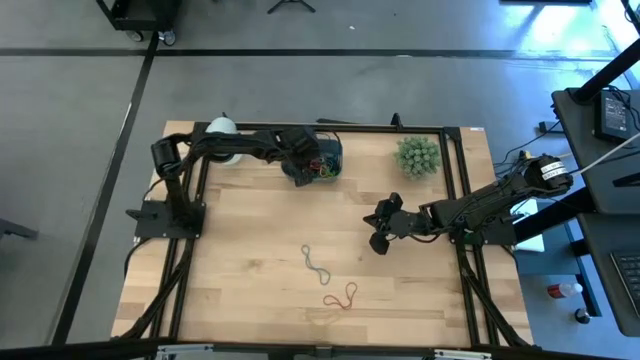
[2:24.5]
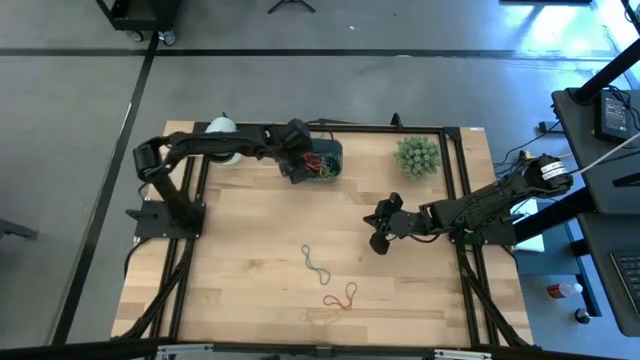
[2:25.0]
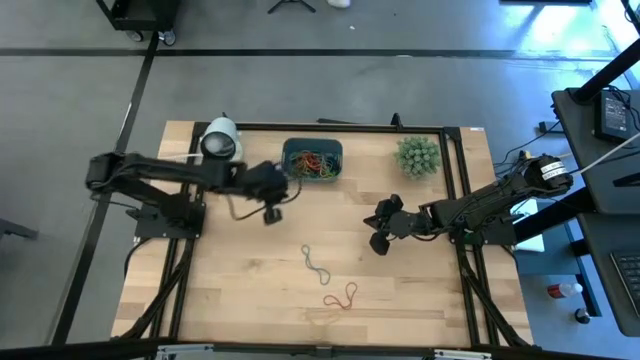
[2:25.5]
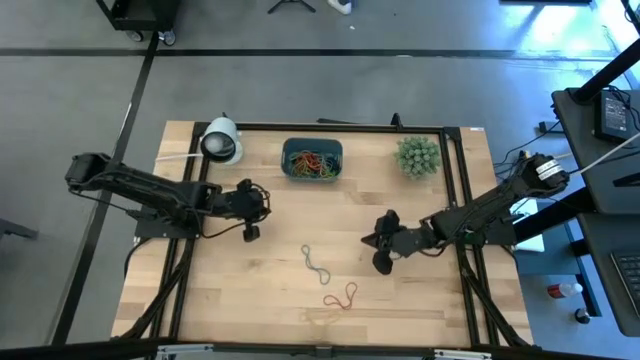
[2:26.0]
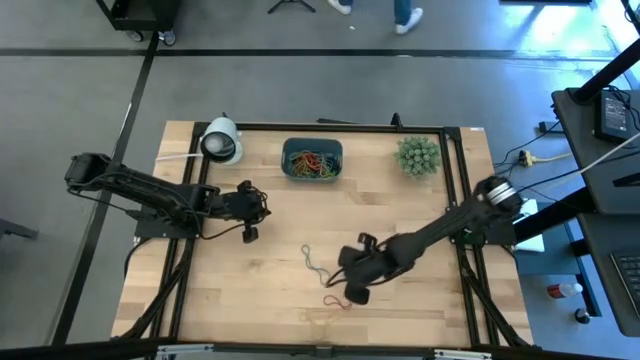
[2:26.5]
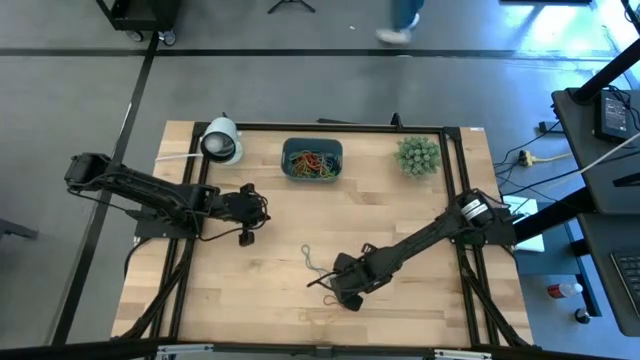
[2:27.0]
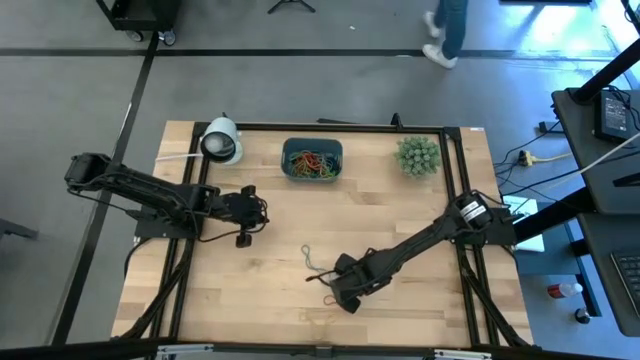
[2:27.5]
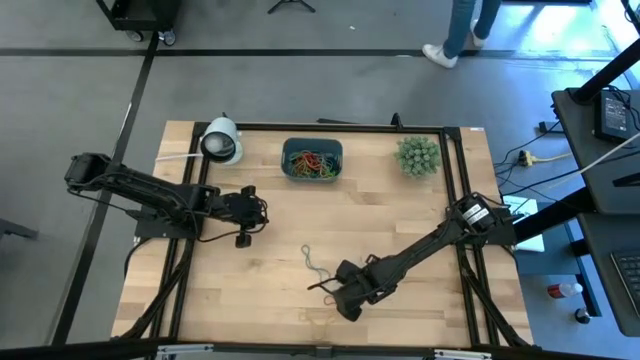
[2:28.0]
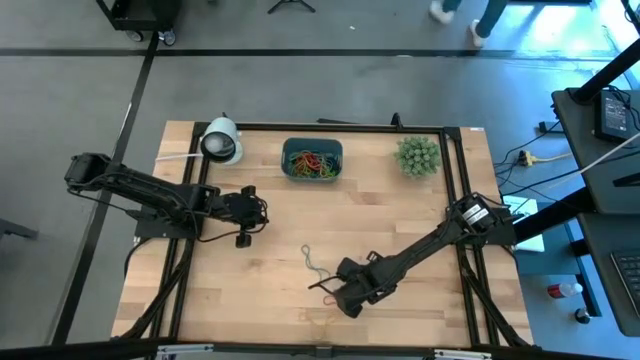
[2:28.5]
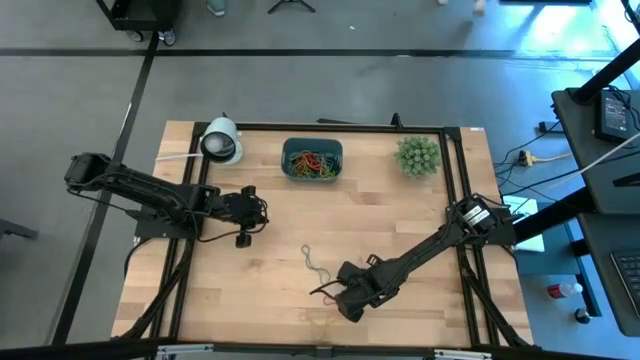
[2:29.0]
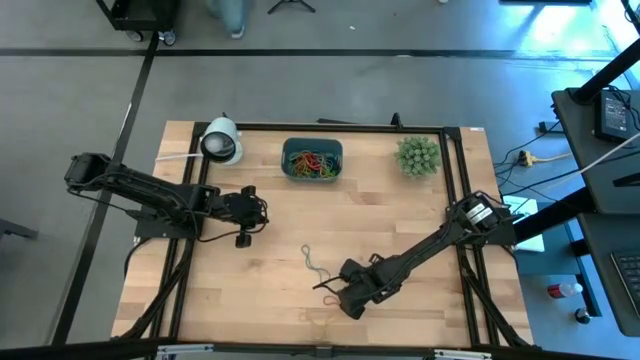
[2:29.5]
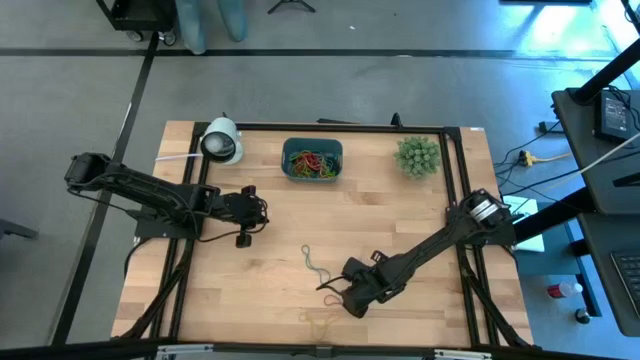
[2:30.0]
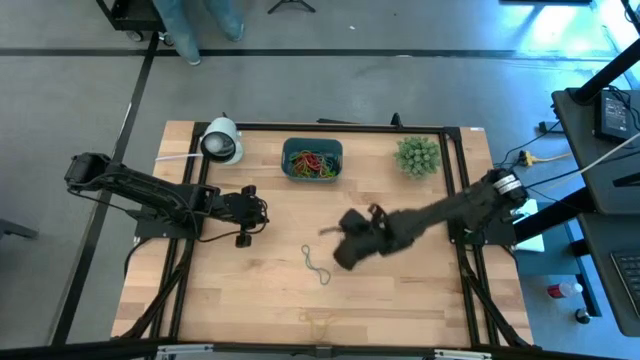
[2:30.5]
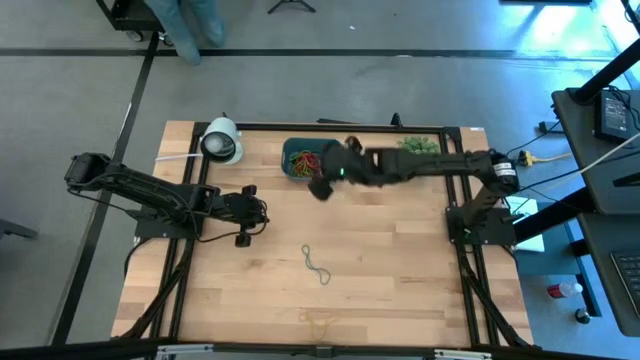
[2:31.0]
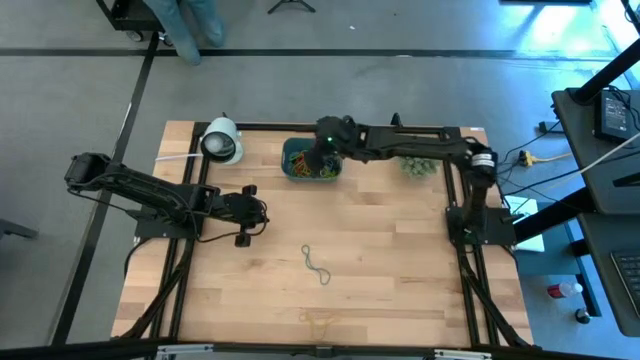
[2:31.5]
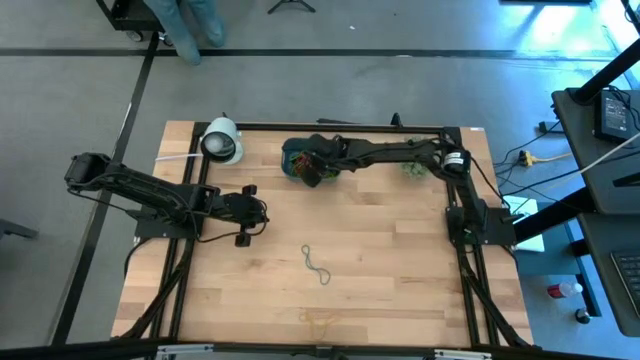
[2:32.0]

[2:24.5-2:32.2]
Task: Pick and place rubber bands into bin
Put the red rubber band into the blue bin

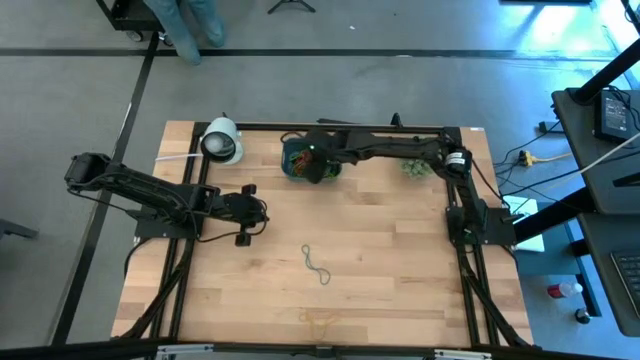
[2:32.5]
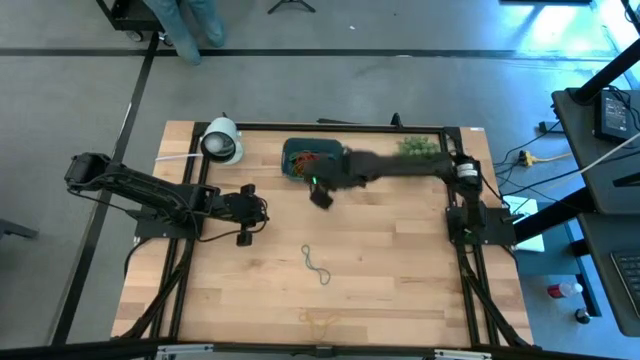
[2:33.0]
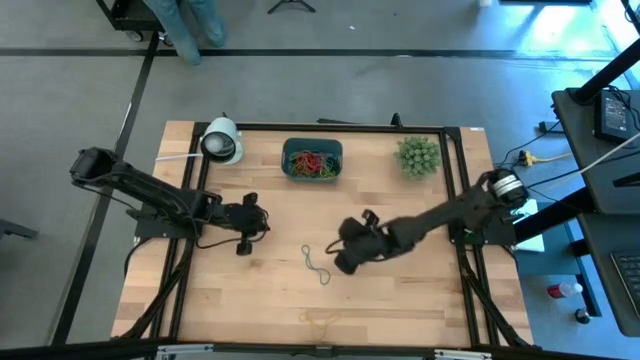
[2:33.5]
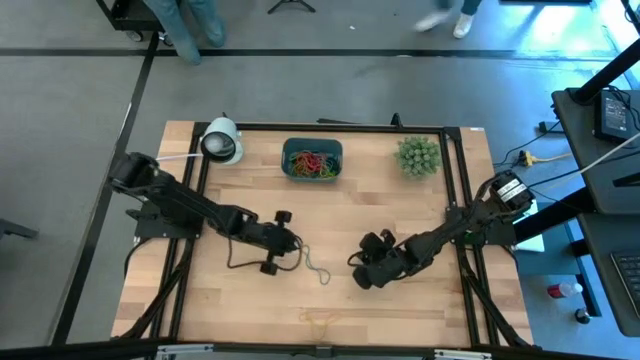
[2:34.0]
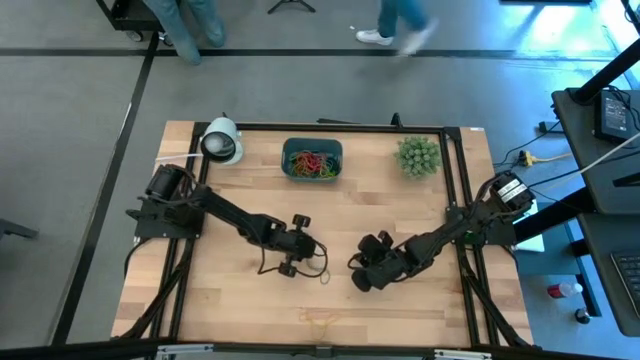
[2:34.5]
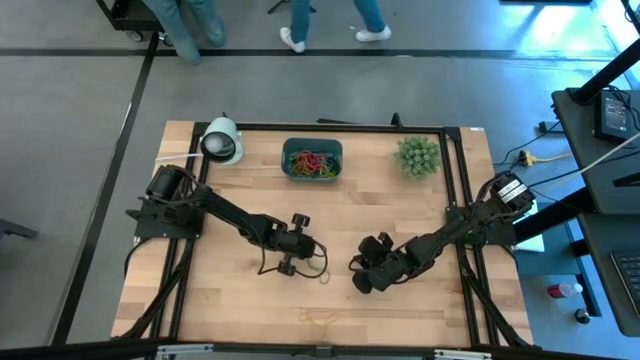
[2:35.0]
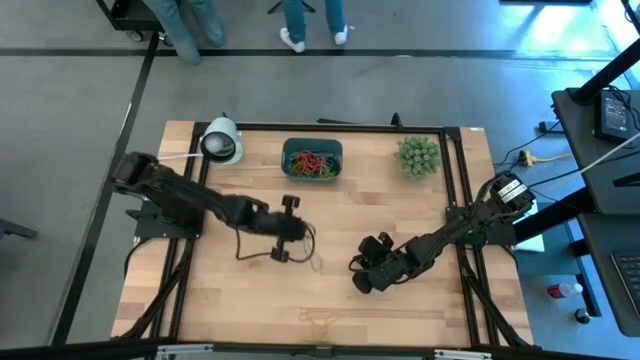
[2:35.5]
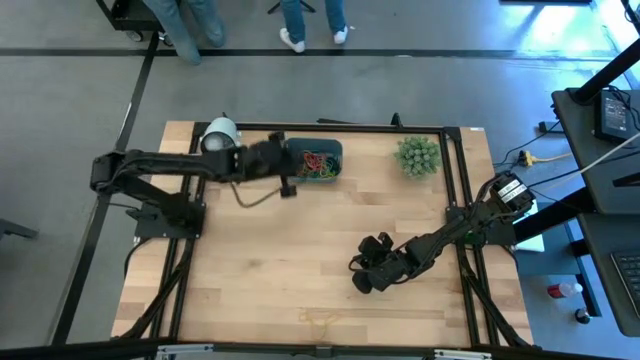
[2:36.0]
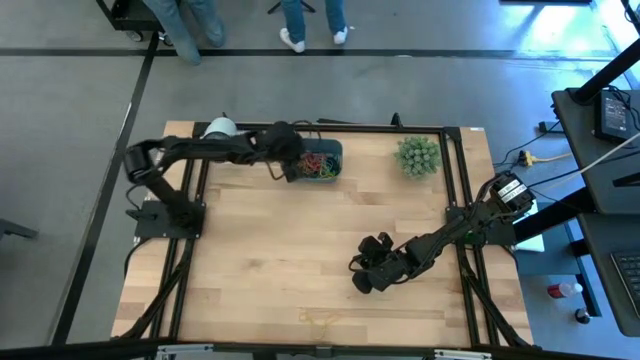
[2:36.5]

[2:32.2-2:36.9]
Put the blue rubber band into the blue bin

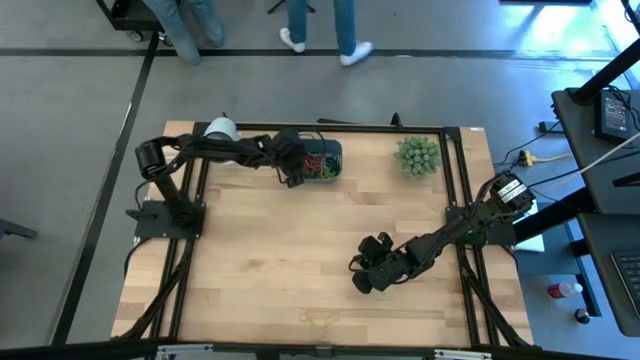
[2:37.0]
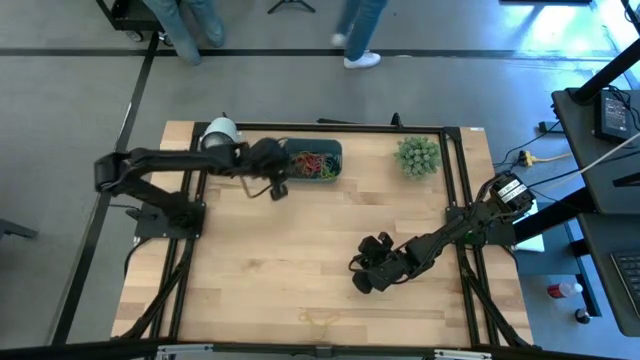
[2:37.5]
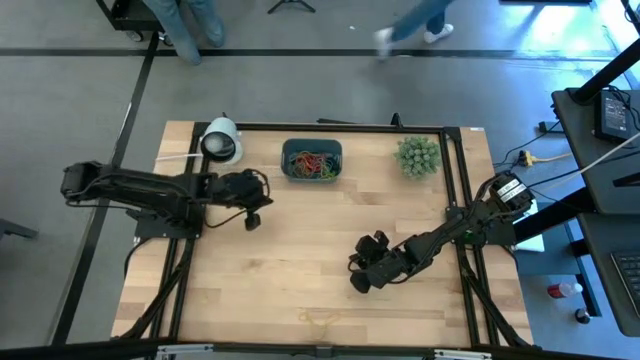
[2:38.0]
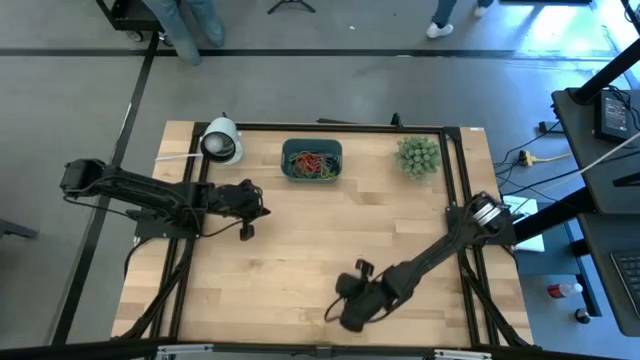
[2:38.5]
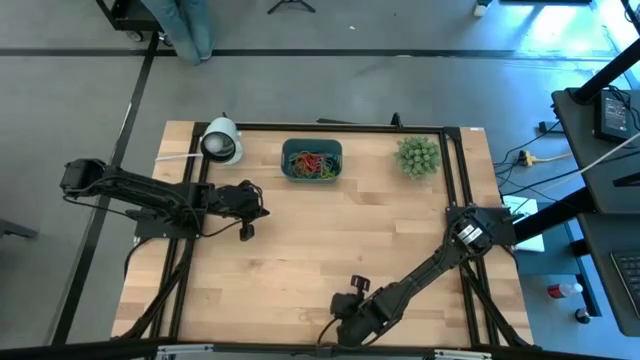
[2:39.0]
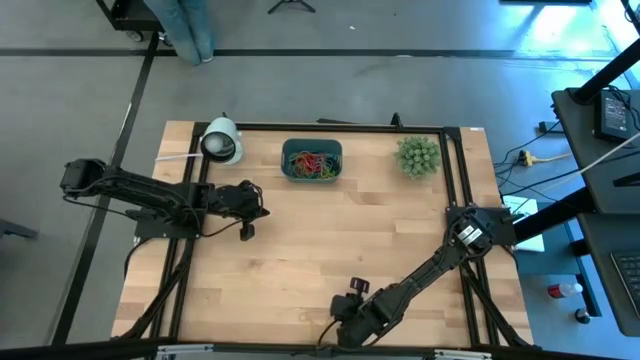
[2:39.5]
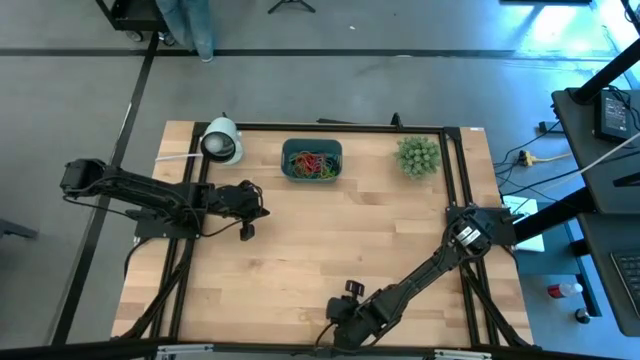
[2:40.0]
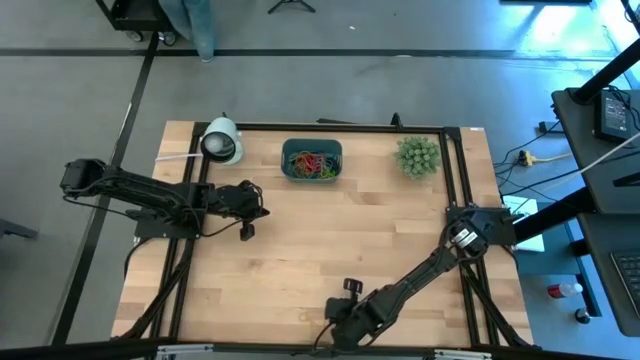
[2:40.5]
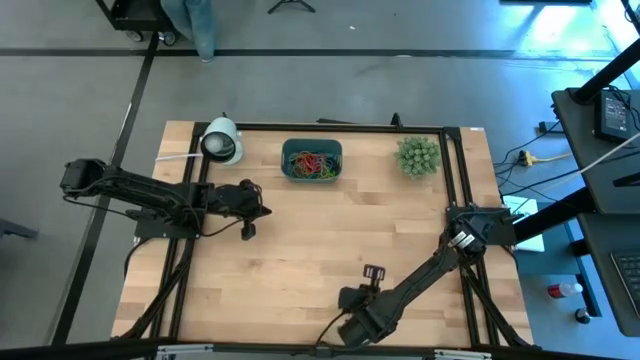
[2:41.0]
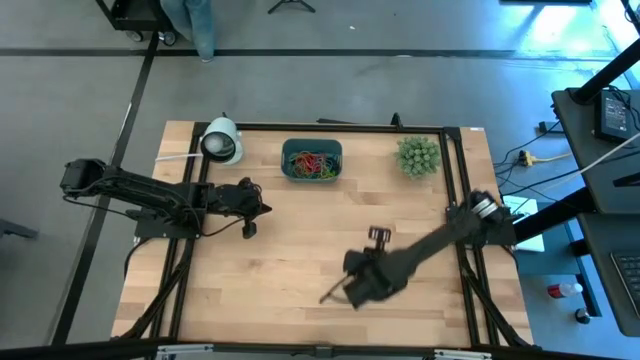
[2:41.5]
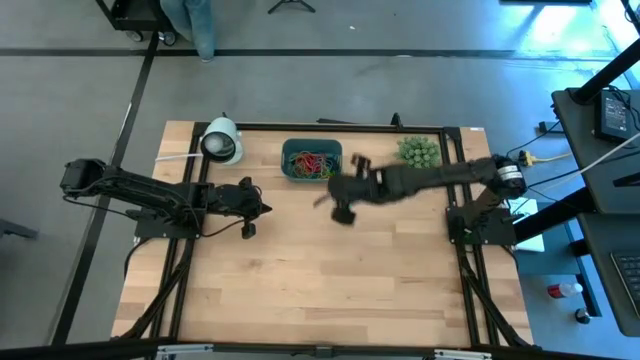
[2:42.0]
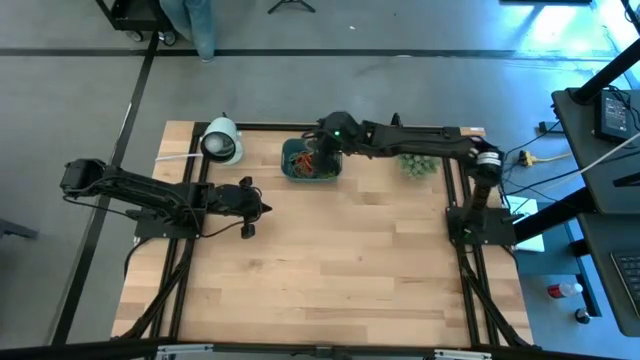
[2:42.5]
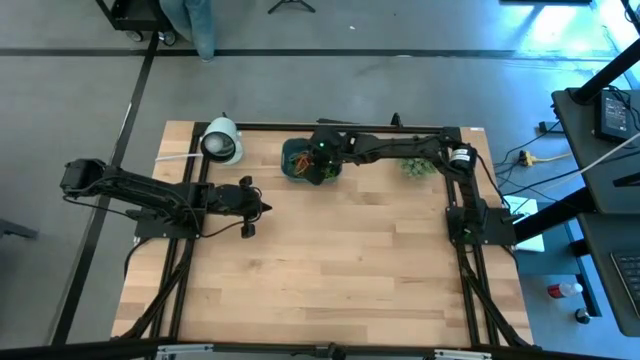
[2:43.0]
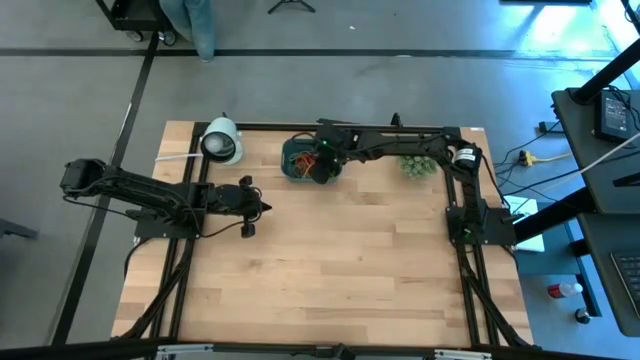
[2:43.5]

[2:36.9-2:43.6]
Put the yellow rubber band into the blue bin
